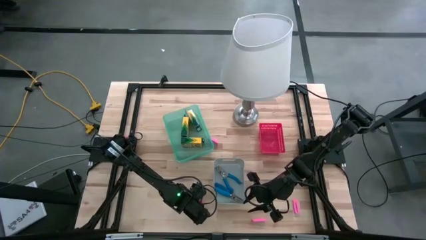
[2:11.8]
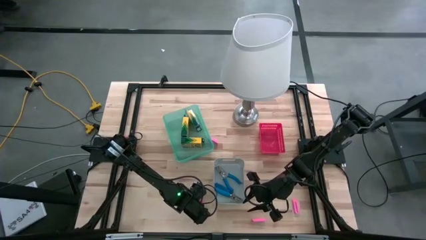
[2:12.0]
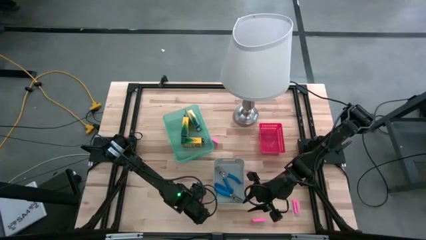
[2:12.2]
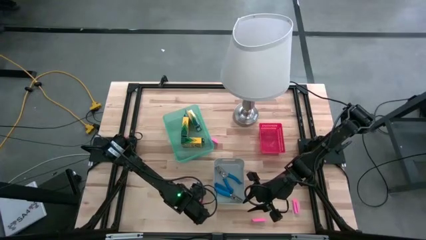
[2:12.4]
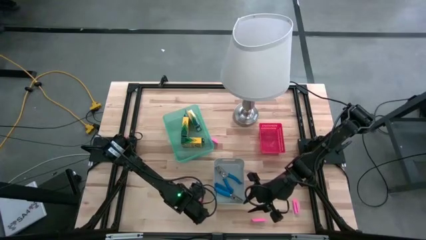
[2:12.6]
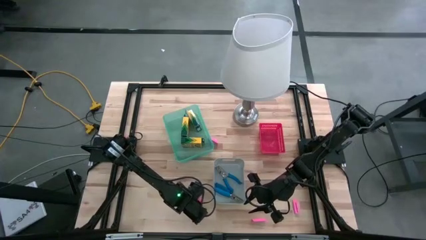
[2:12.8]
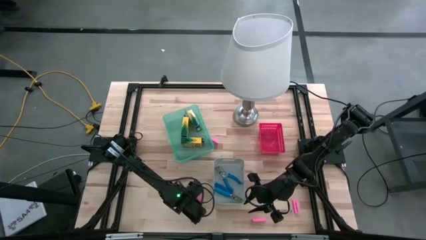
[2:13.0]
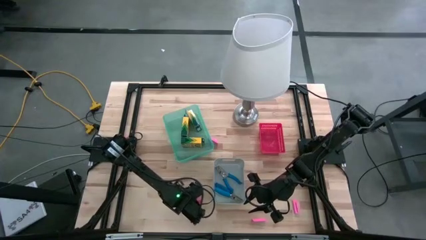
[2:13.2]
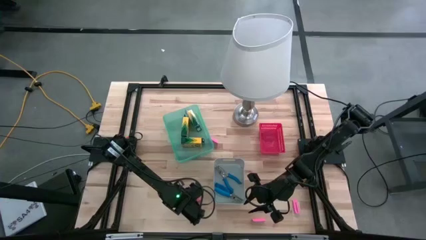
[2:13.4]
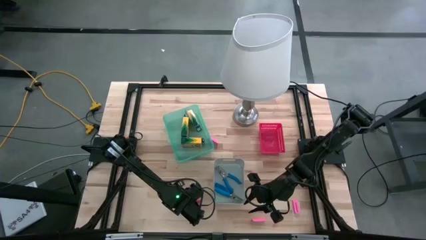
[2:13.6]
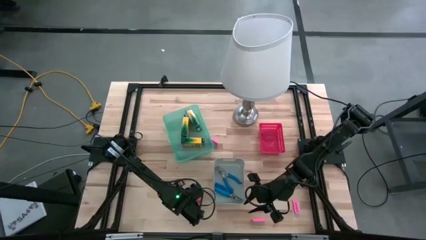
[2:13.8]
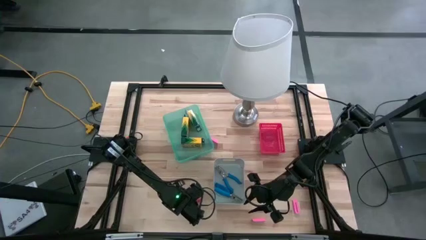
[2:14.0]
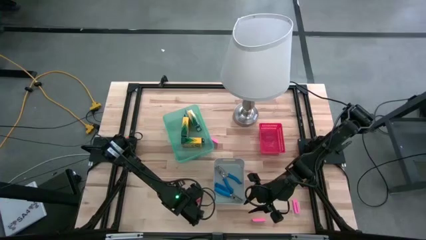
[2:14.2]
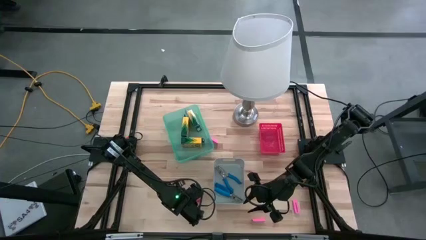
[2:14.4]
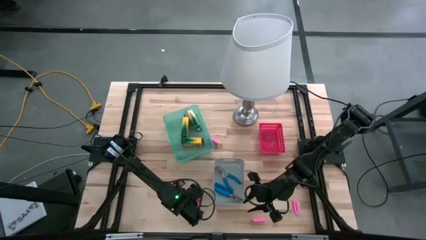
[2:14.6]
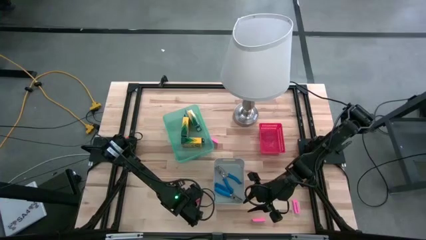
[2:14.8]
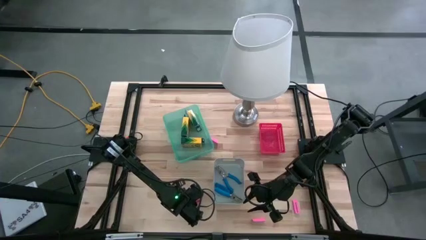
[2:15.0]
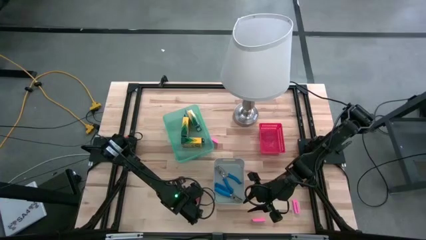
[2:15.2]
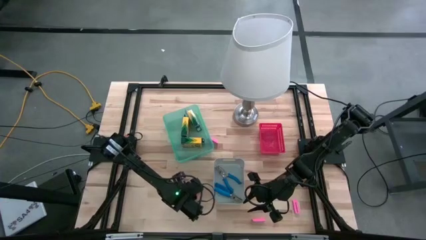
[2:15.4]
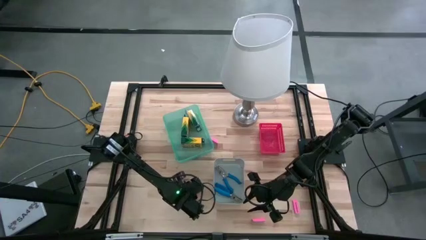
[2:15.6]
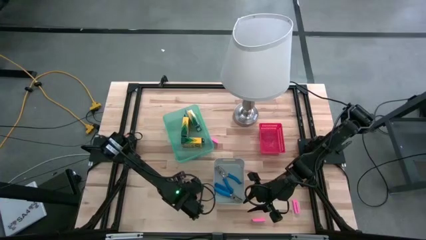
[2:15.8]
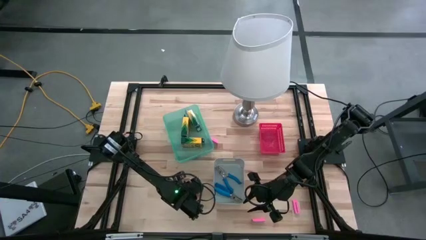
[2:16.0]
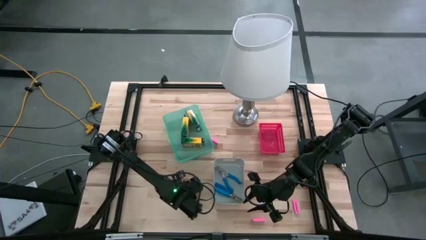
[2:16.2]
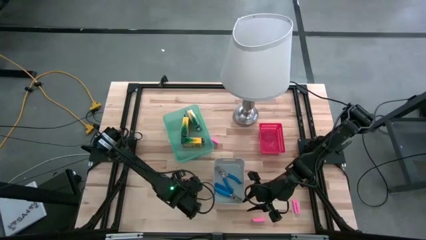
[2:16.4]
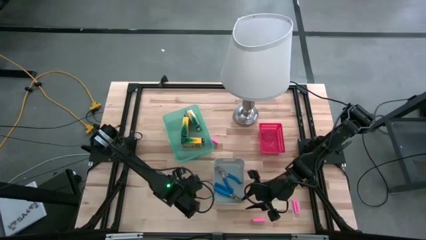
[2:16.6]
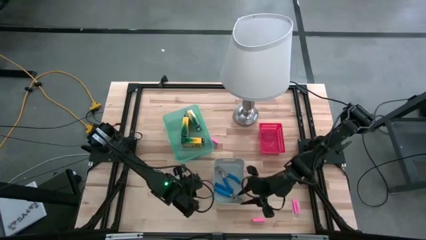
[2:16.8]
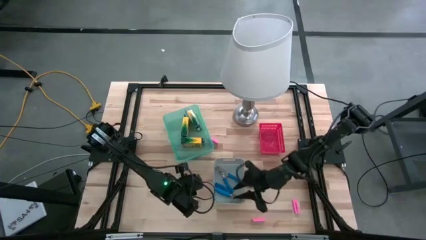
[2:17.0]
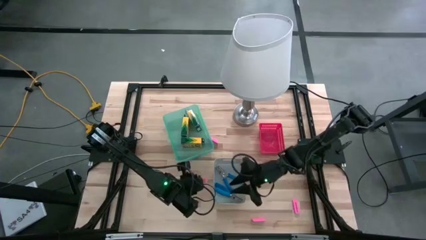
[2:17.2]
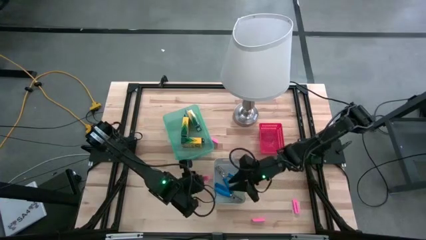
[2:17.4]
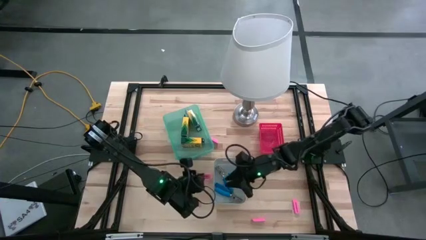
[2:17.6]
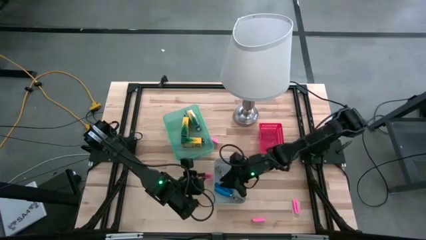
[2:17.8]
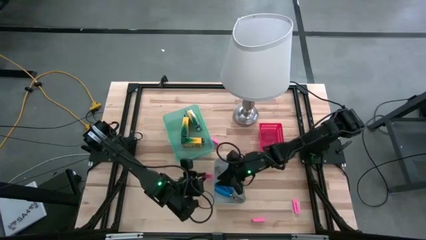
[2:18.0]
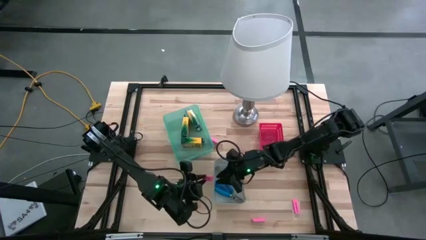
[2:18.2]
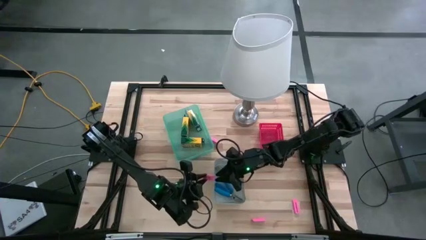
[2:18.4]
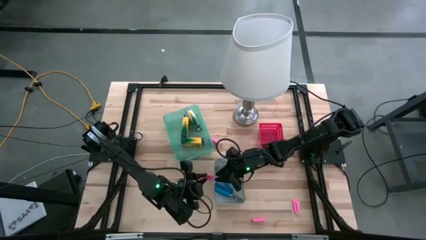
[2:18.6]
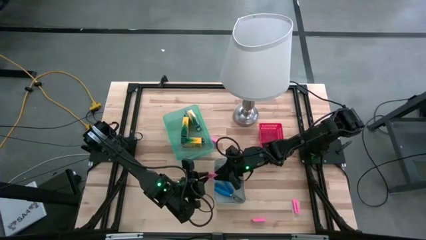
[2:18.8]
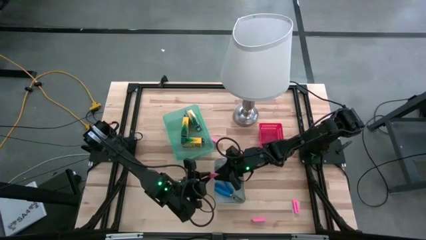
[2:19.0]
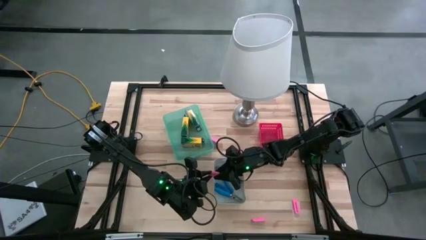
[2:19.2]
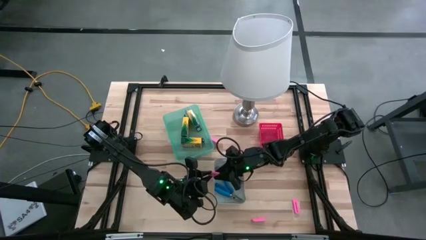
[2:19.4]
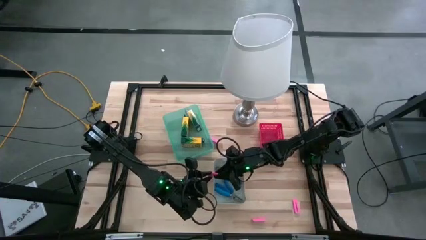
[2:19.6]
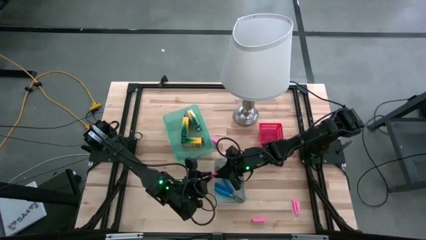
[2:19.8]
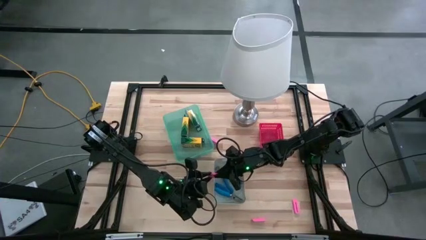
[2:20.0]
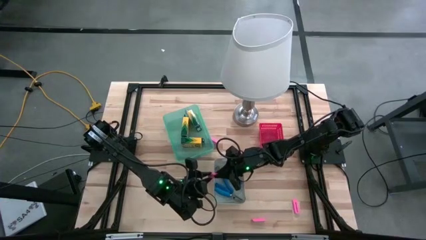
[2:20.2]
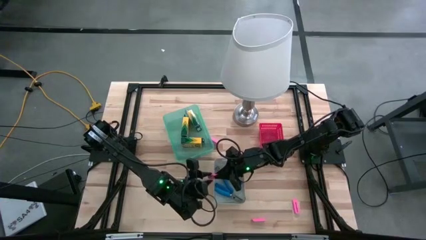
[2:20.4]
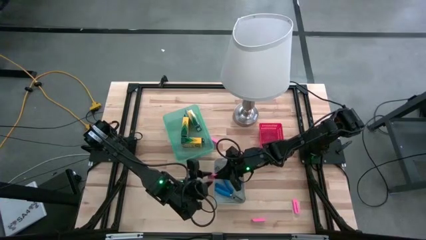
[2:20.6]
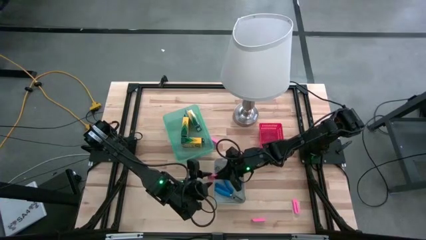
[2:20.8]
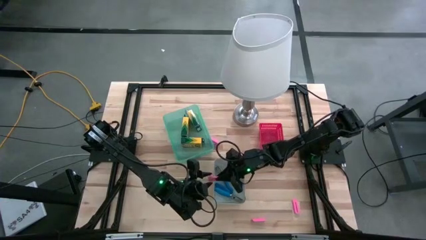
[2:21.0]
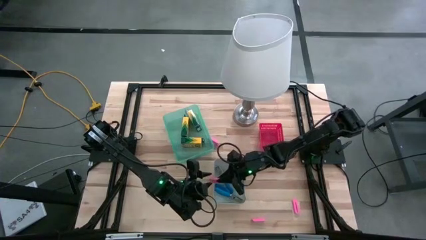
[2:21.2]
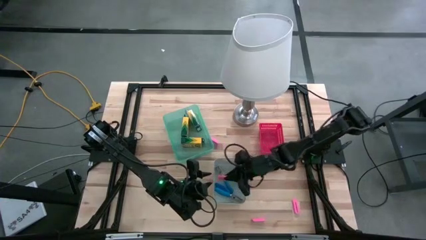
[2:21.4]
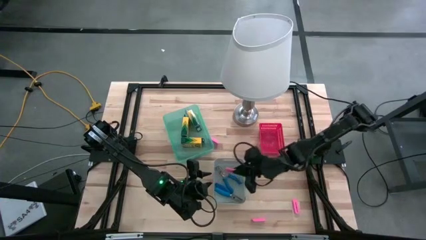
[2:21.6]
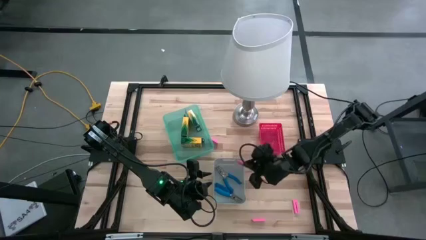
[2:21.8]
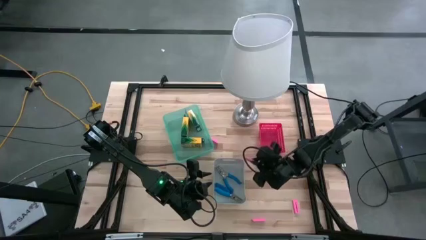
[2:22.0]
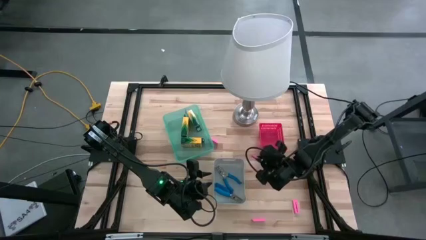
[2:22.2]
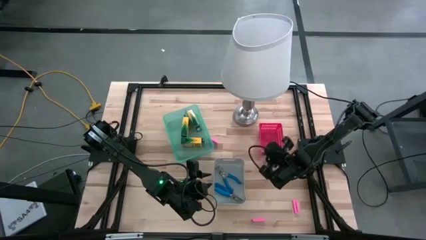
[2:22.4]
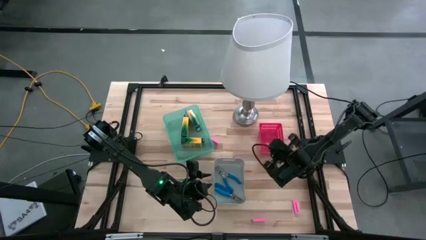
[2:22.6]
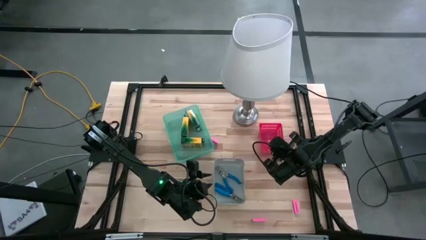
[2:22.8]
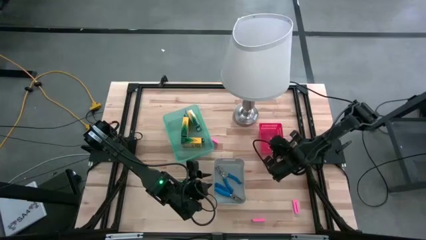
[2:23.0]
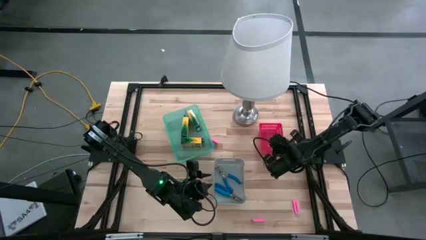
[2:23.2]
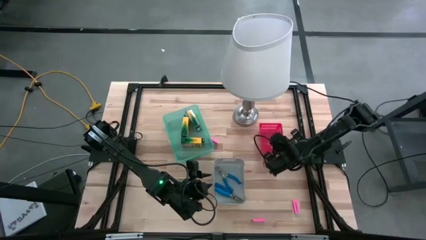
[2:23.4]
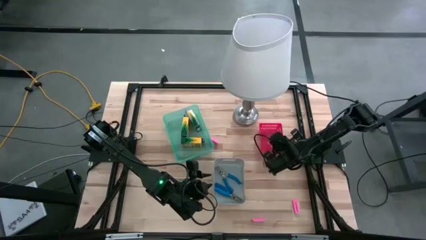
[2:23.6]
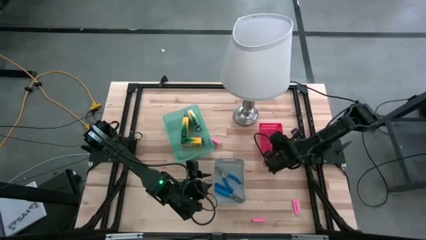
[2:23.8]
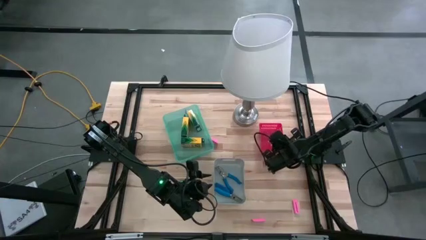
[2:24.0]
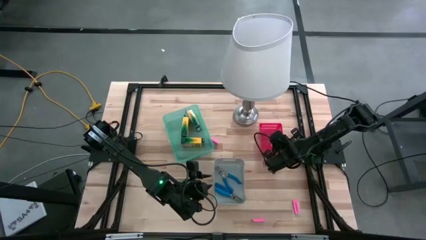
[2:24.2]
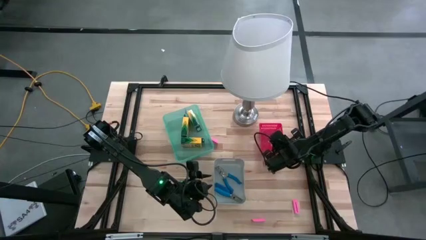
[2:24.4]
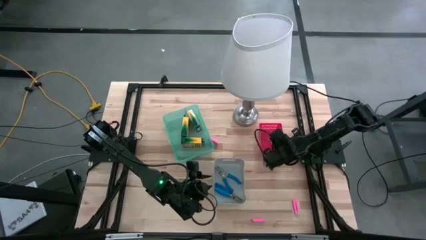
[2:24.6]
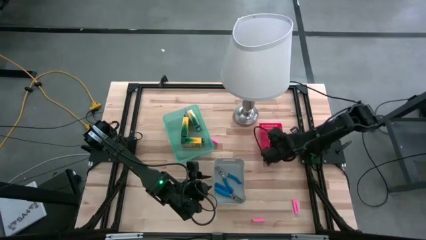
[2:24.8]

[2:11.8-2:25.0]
Task: Pick & Place School Supplies
Put the pink eraser into the red bin

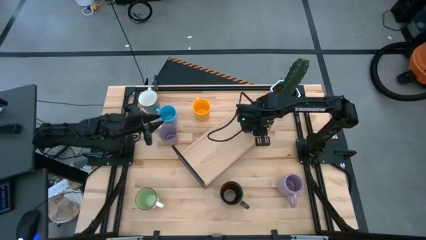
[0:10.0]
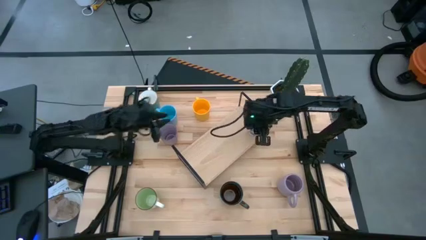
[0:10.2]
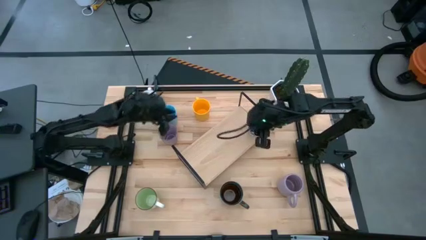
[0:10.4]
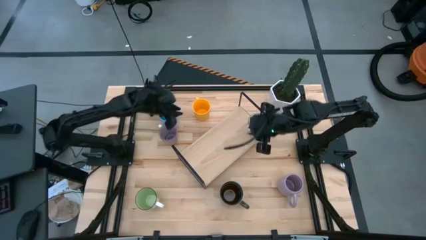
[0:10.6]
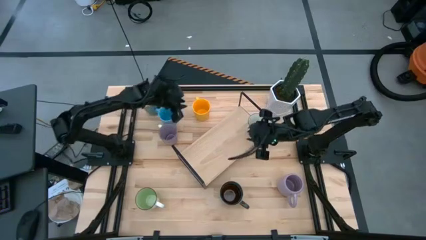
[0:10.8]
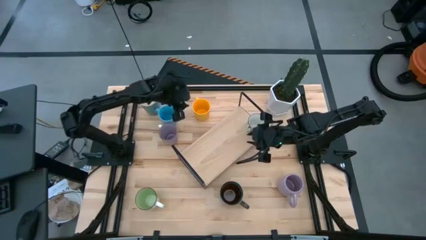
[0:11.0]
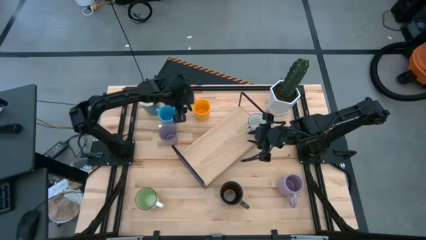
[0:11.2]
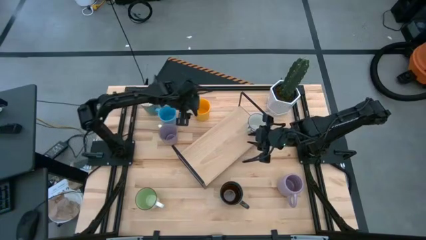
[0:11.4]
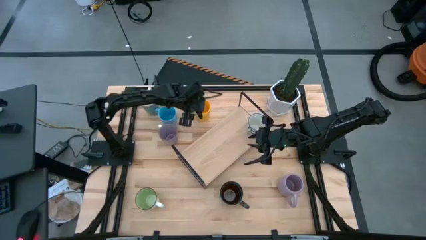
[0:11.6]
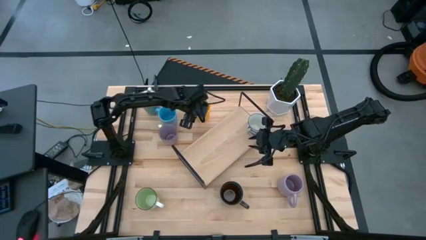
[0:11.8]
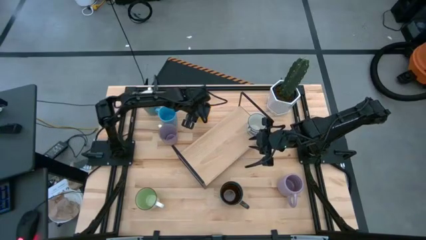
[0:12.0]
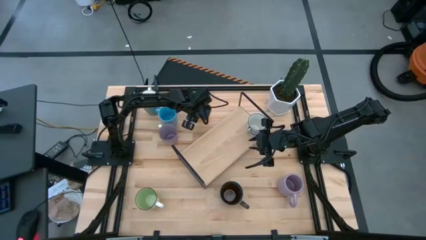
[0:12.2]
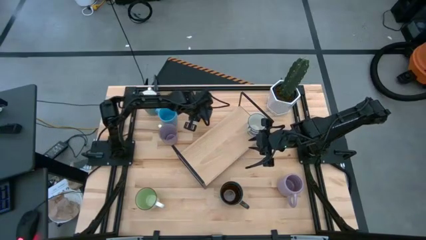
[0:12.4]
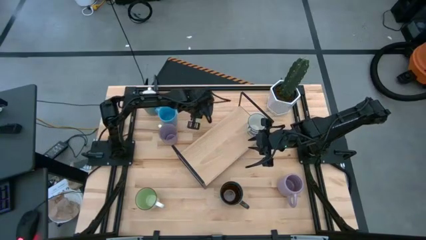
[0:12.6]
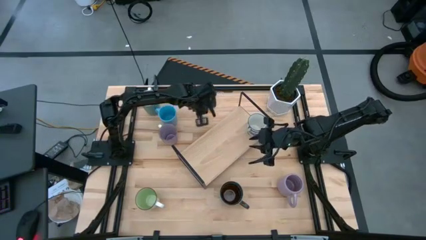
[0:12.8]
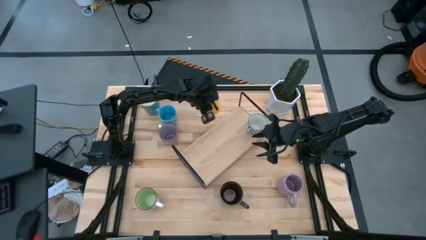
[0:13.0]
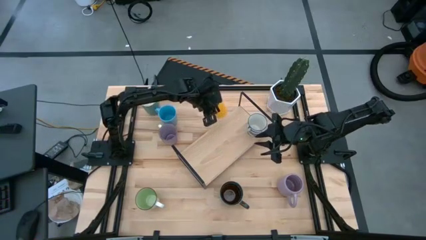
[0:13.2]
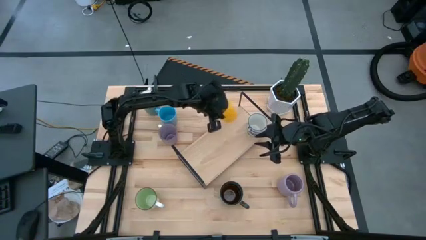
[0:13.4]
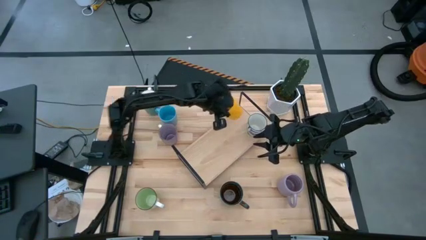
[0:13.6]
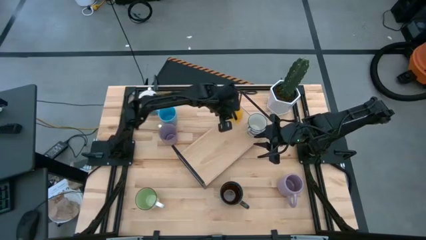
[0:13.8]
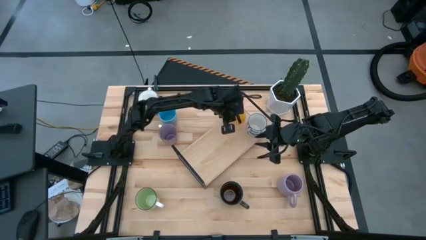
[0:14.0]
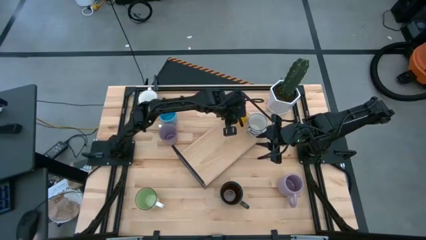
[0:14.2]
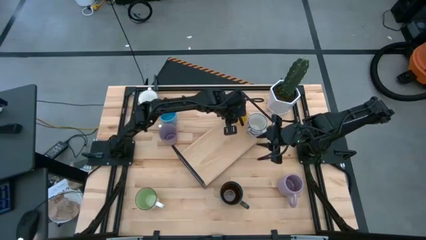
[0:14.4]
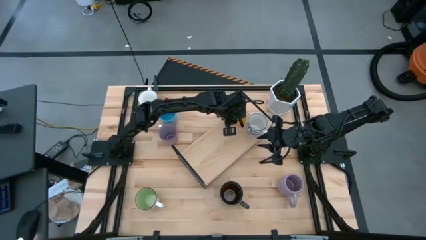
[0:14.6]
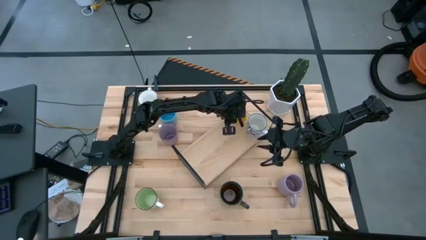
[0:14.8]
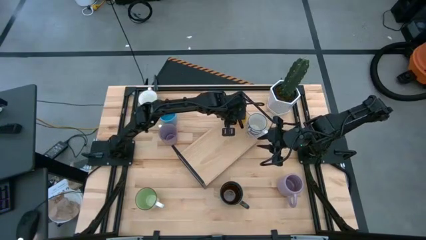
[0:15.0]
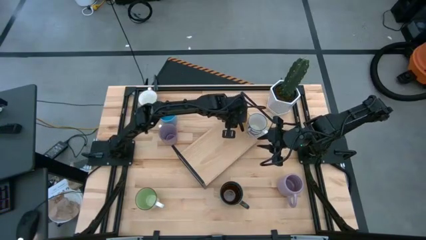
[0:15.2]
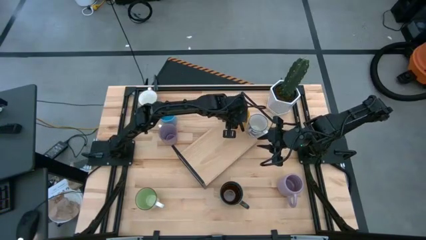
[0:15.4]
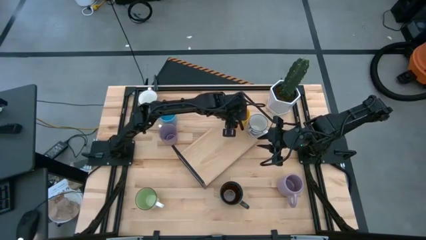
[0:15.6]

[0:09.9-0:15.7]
Task: Place coffee mugs
Put the yellow mug onto the shelf
